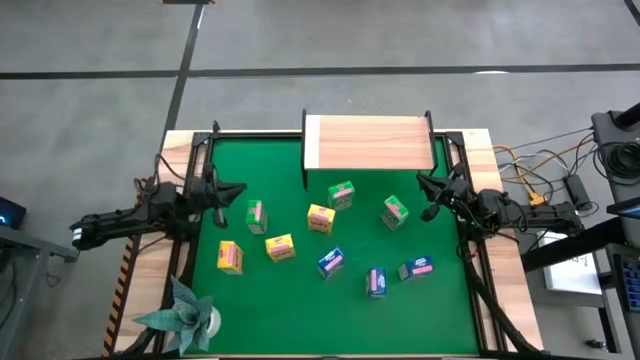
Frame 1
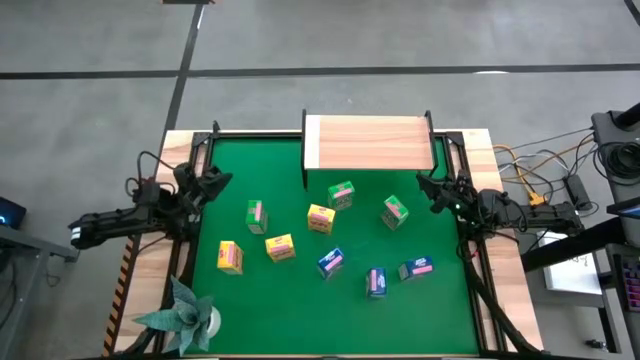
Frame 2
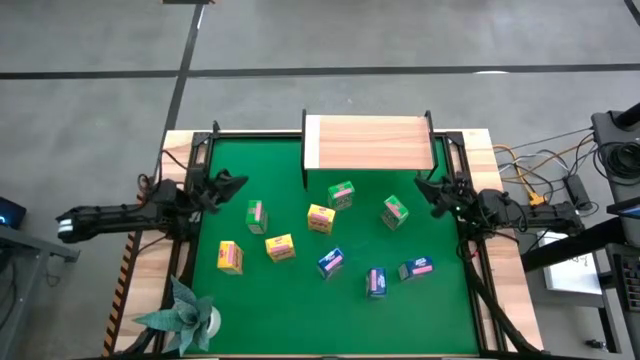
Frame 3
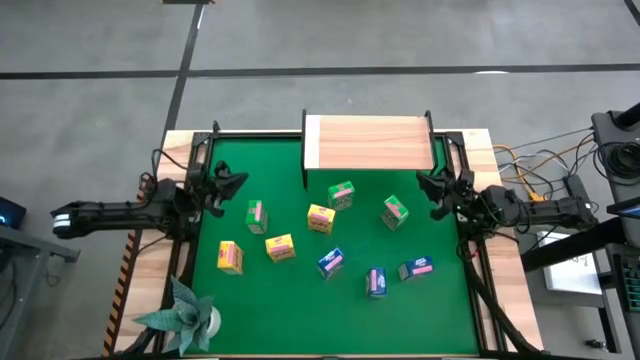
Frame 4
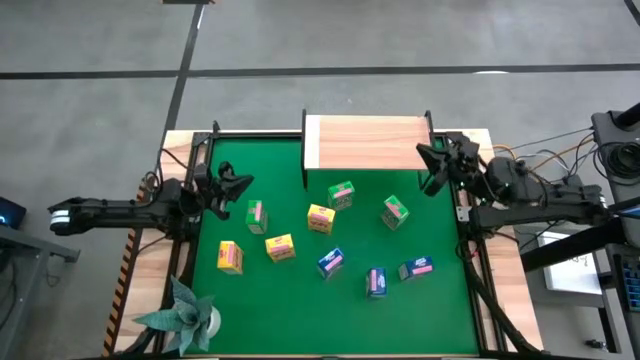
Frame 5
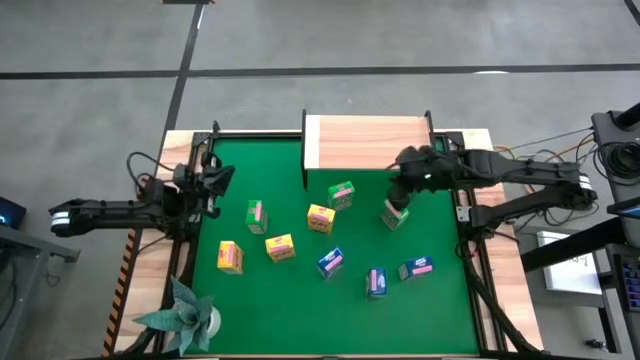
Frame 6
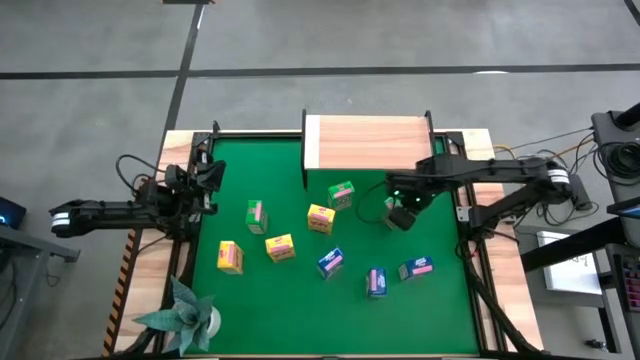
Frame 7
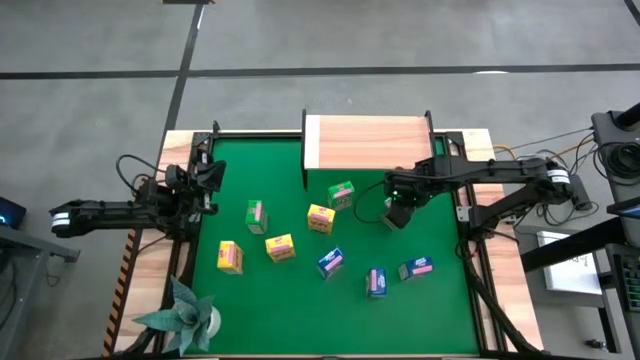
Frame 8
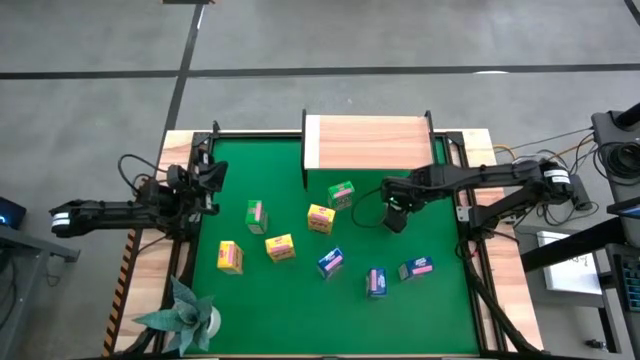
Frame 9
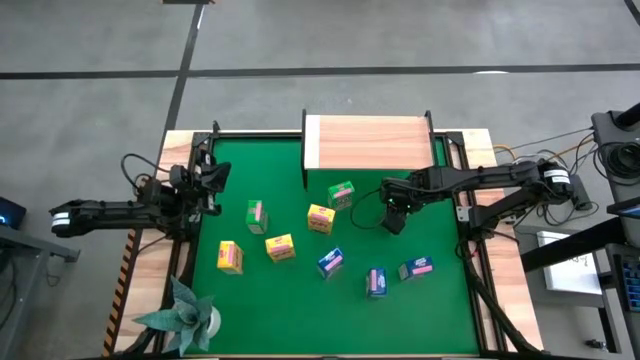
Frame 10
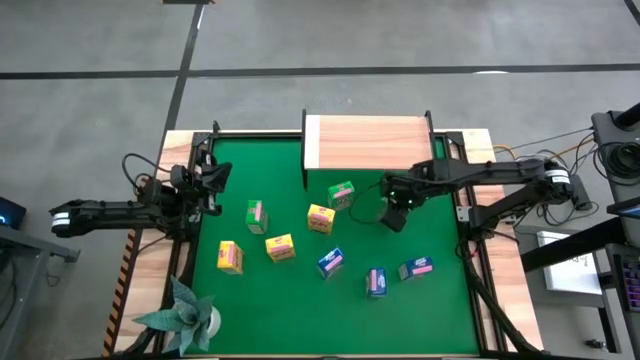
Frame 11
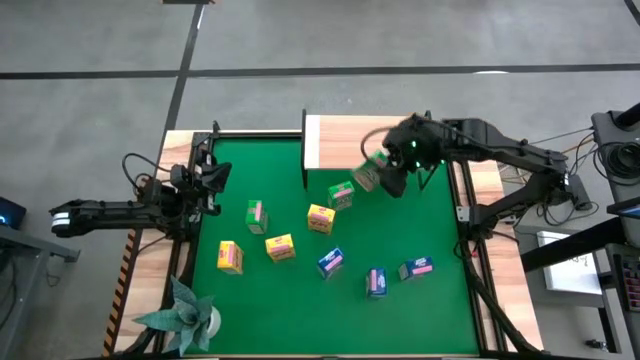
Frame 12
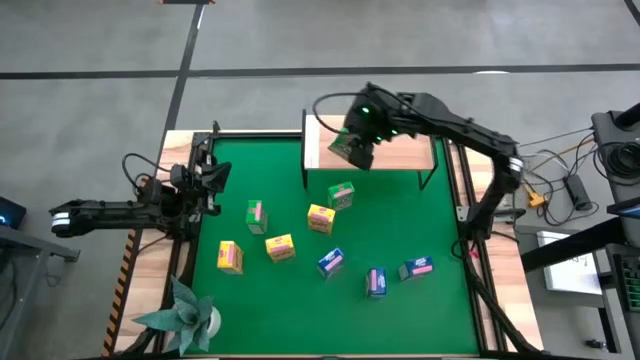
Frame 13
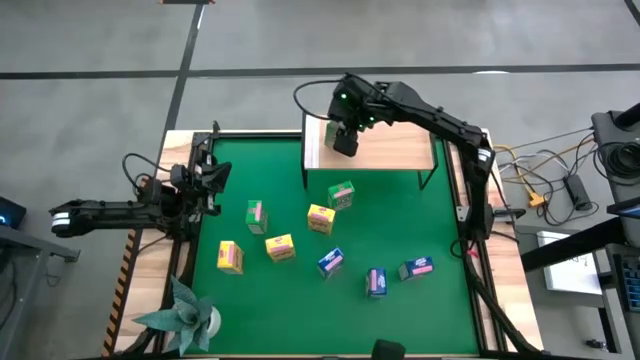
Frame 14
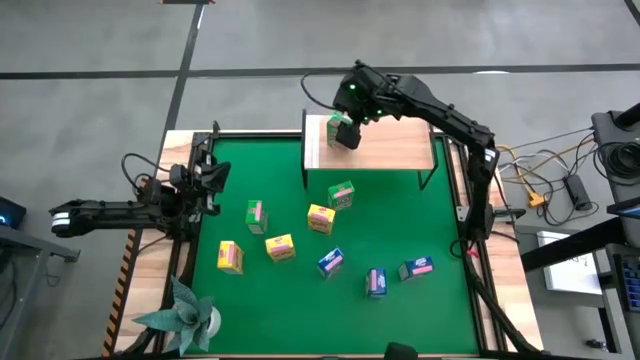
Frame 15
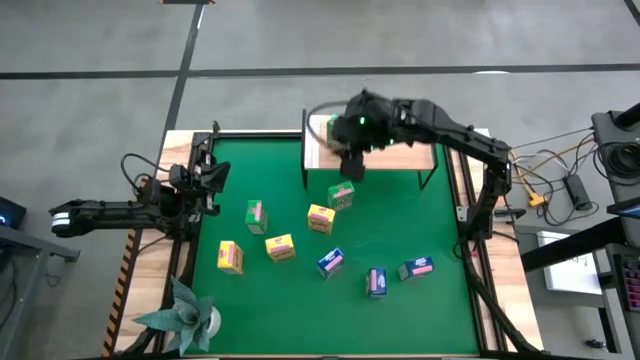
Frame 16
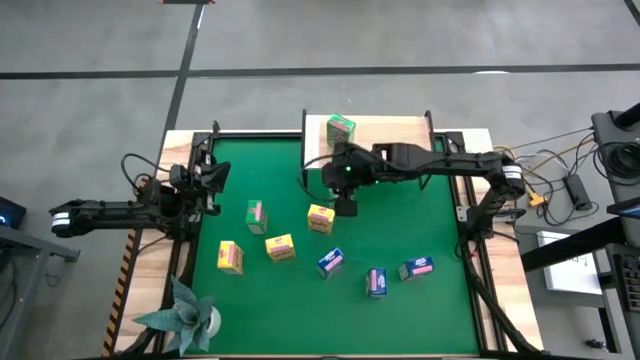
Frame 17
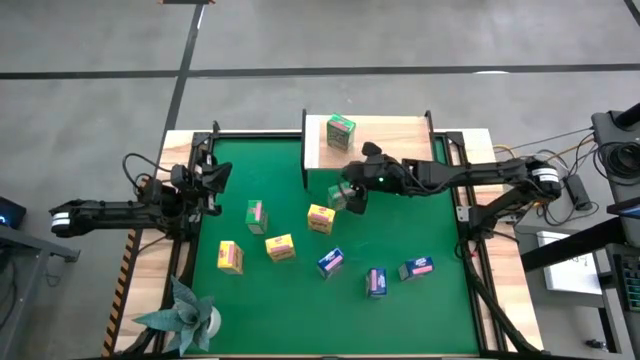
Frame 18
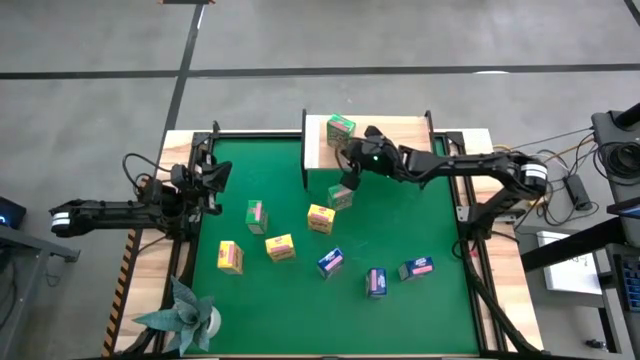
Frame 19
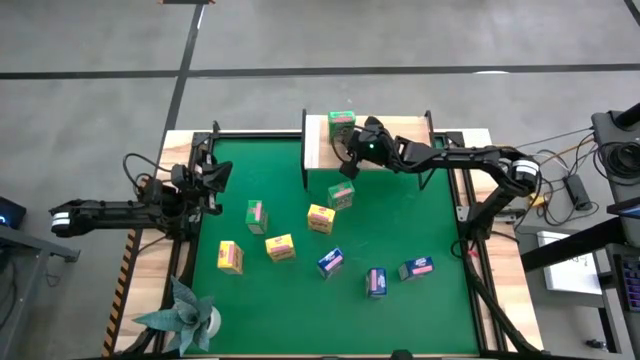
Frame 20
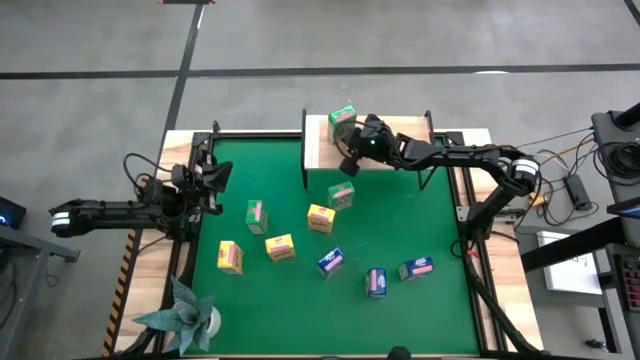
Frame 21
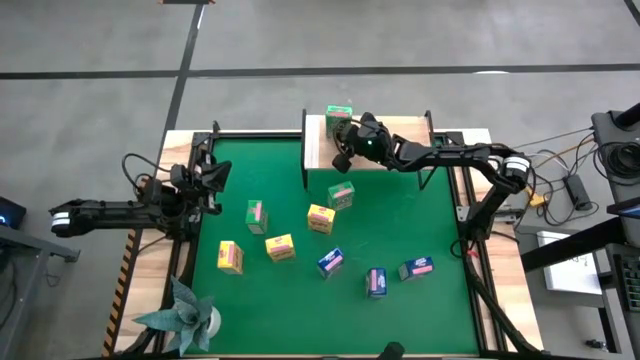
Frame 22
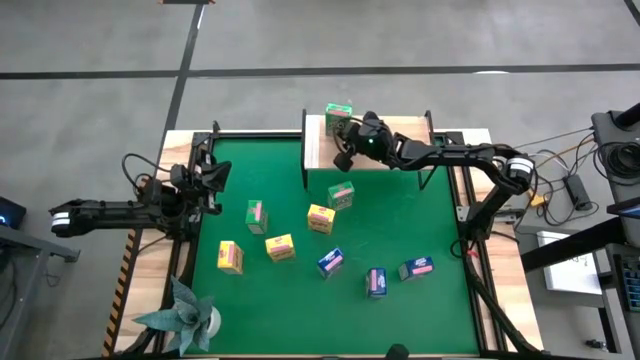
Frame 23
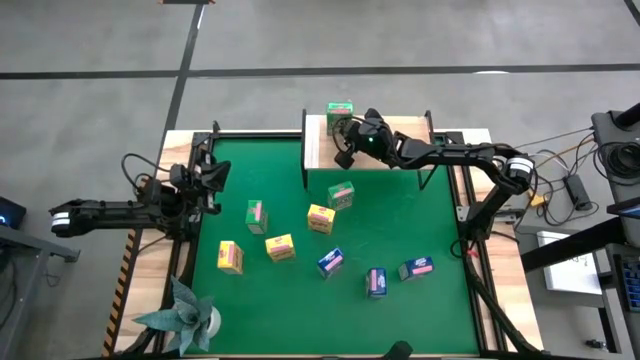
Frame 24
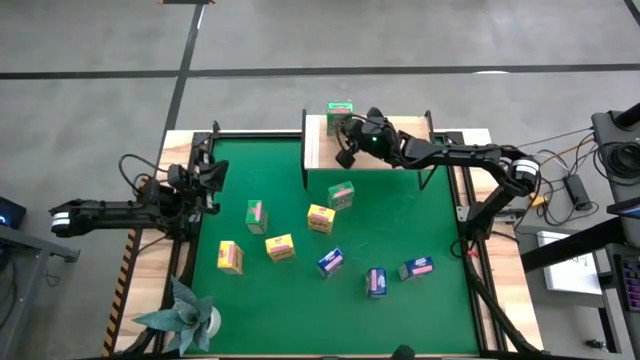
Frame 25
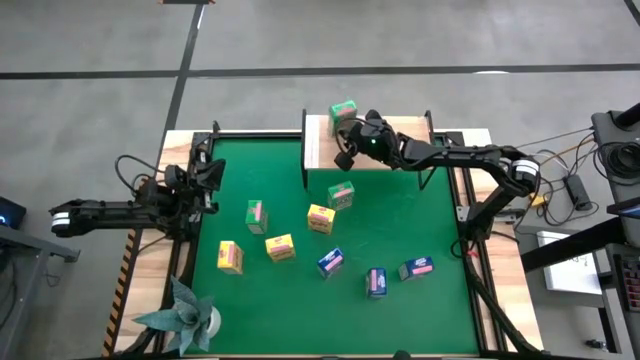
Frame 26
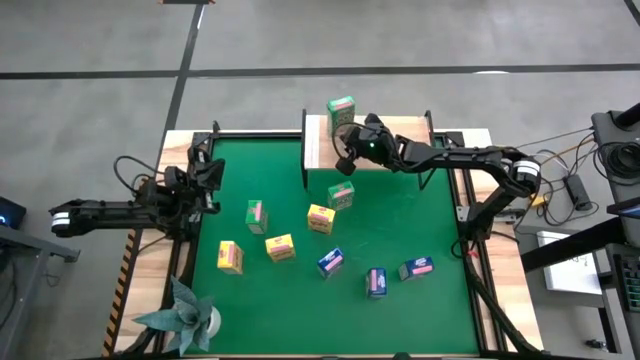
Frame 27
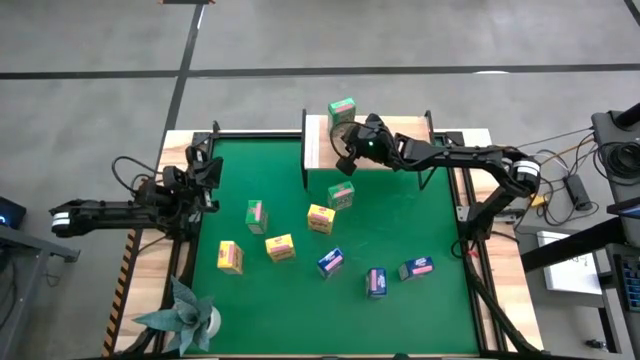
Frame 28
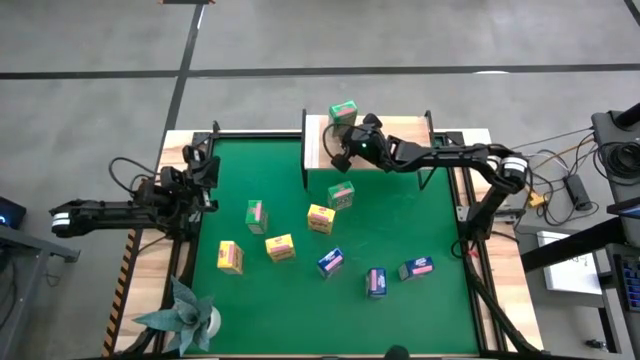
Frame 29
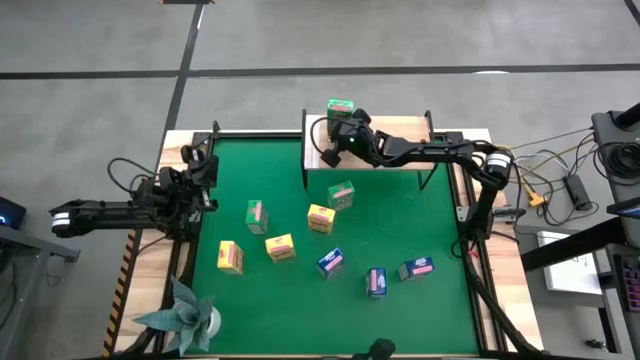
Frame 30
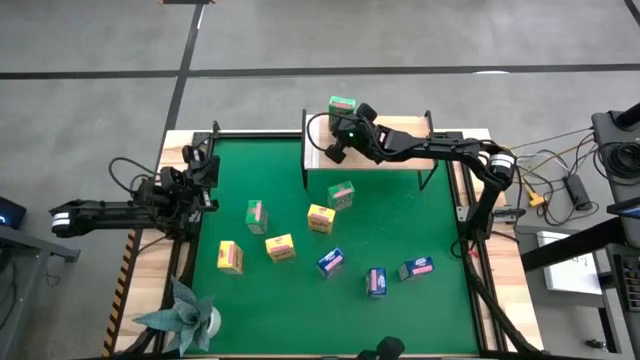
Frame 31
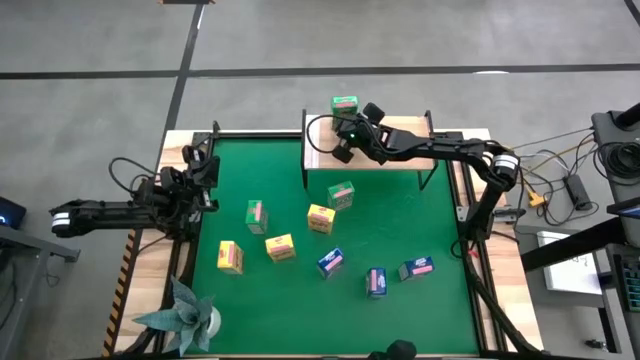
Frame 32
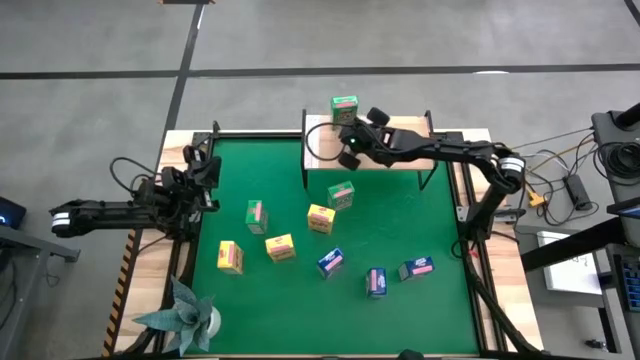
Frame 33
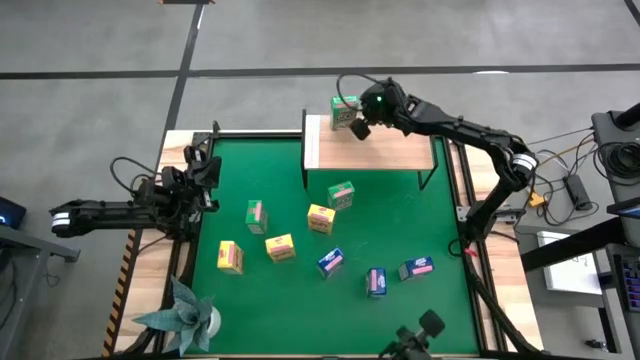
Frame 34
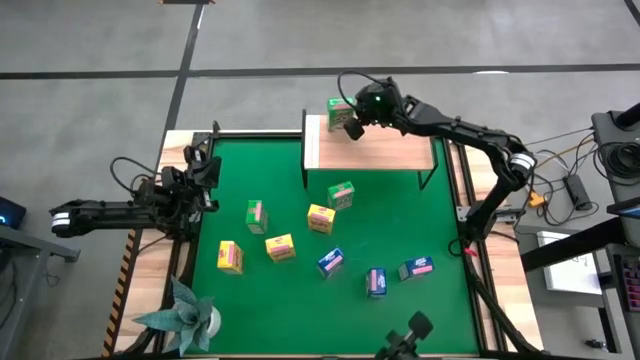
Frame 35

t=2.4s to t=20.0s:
Task: Stack cereal on shelf
Put the right green cereal box on the shelf

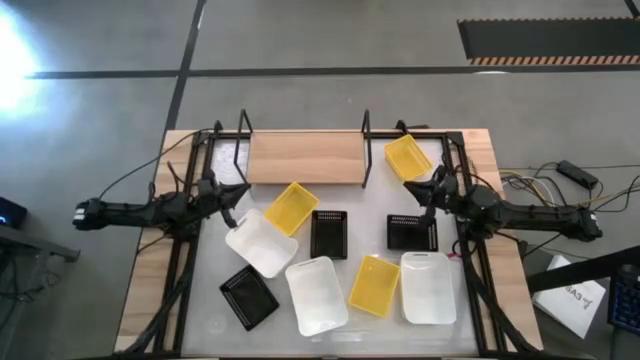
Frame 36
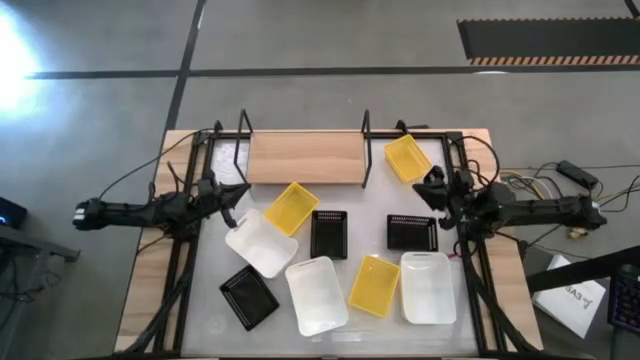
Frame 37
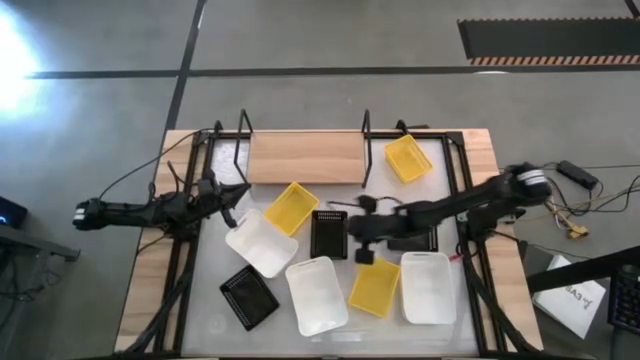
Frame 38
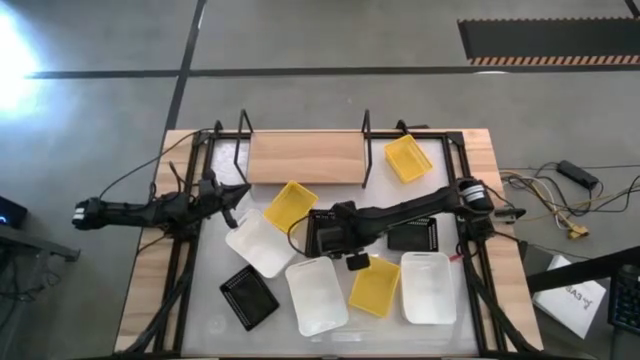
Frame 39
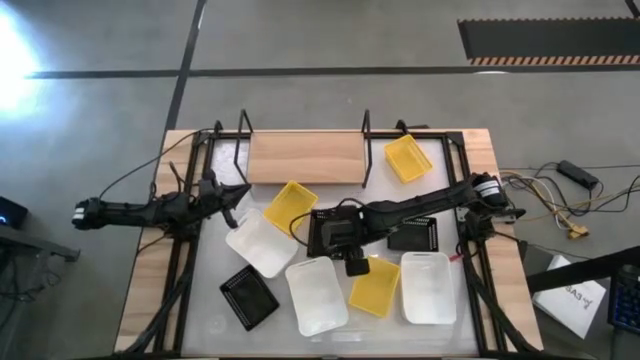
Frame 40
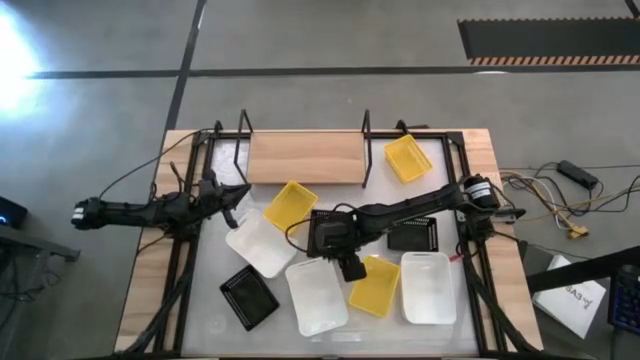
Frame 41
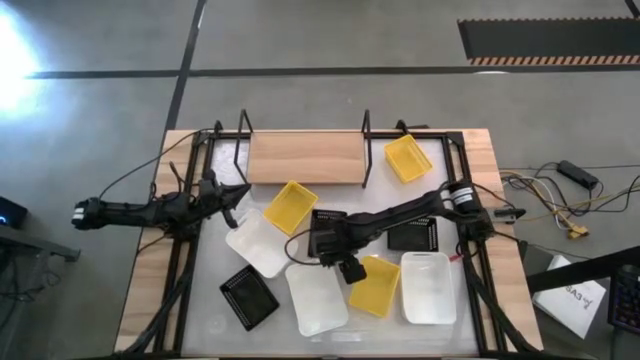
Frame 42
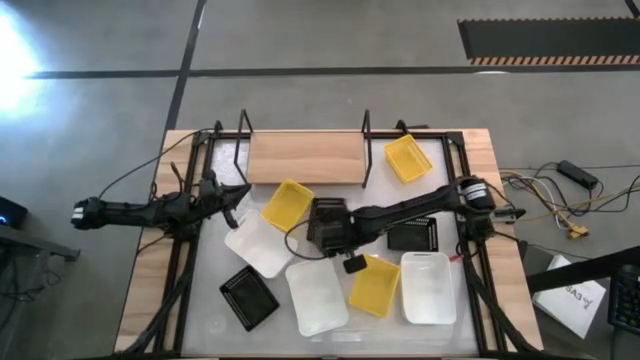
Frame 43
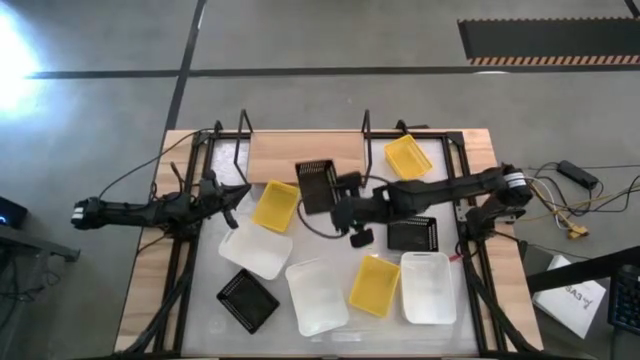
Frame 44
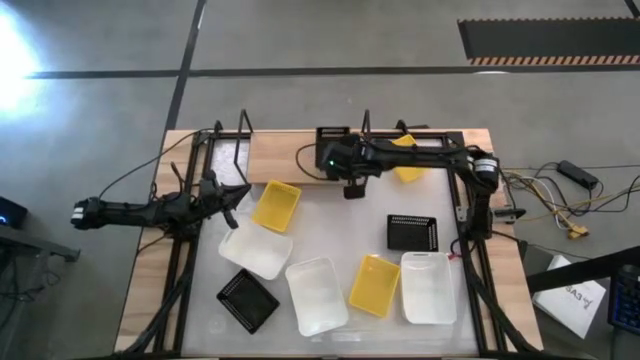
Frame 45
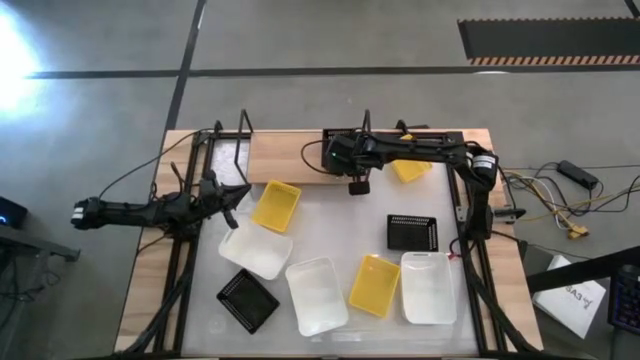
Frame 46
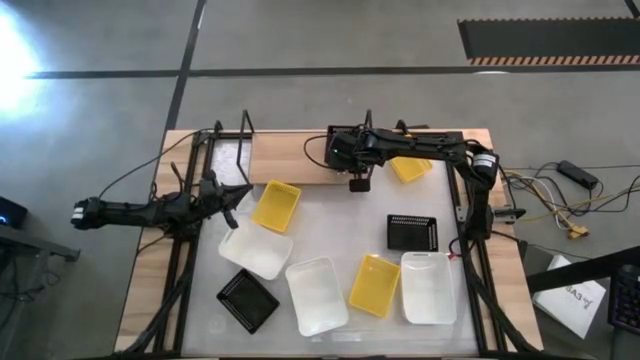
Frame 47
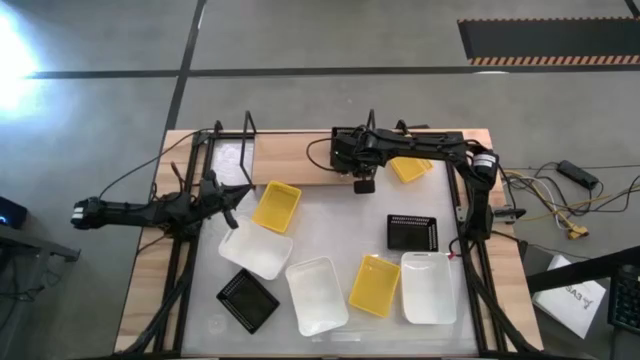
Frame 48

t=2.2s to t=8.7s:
Task: Stack baskets on shelf by color
Put the top left black bin on the shelf
